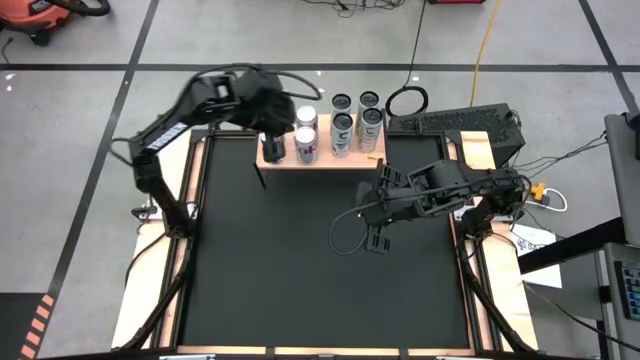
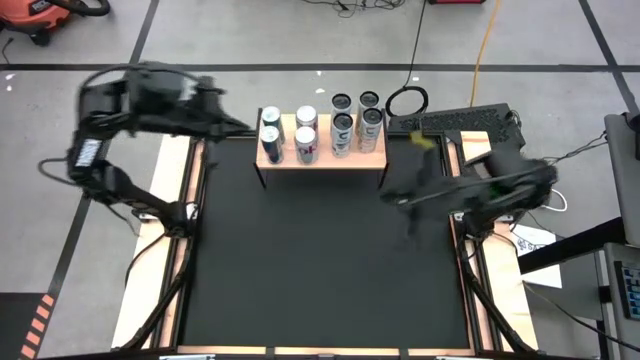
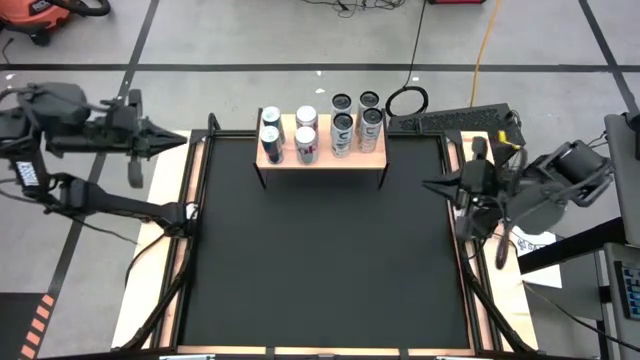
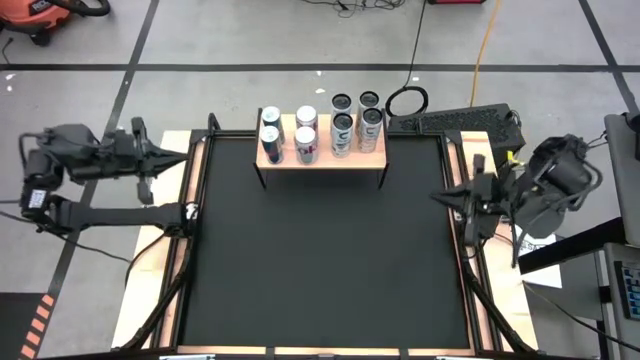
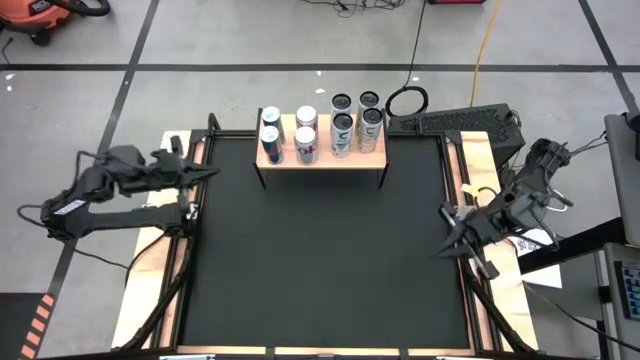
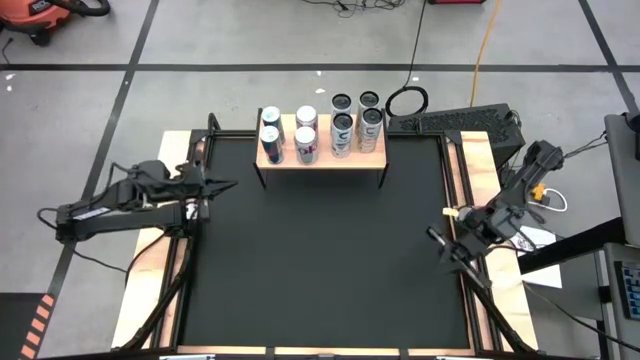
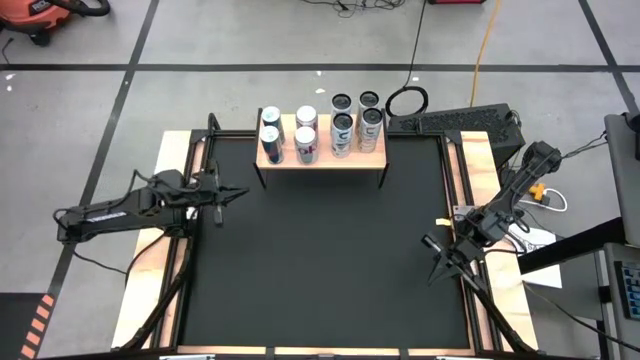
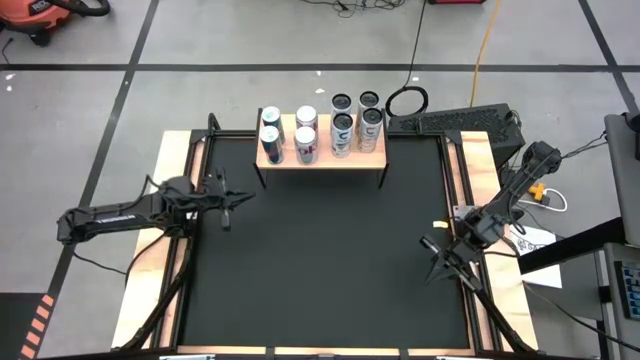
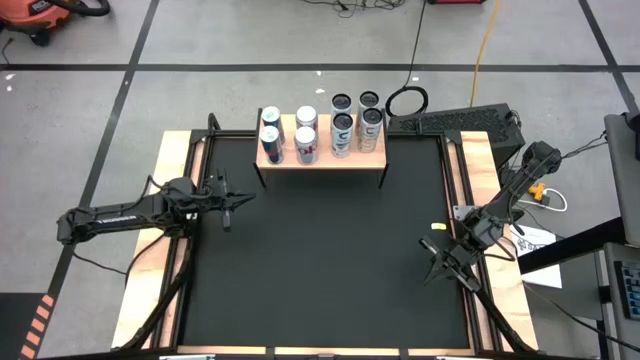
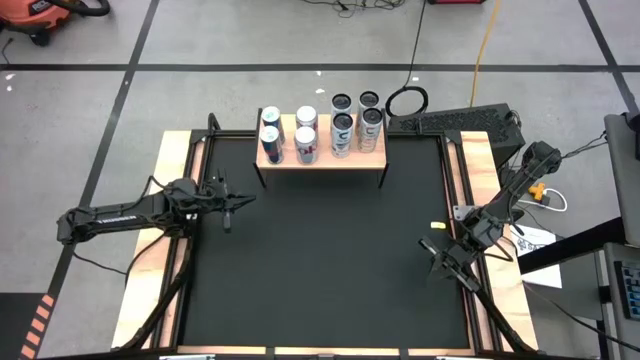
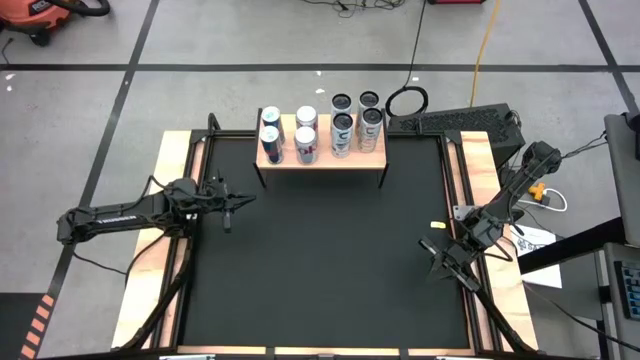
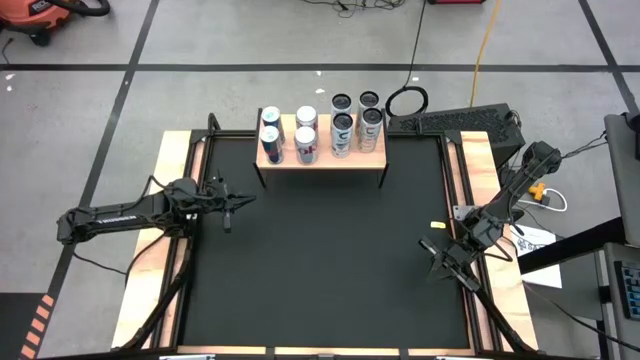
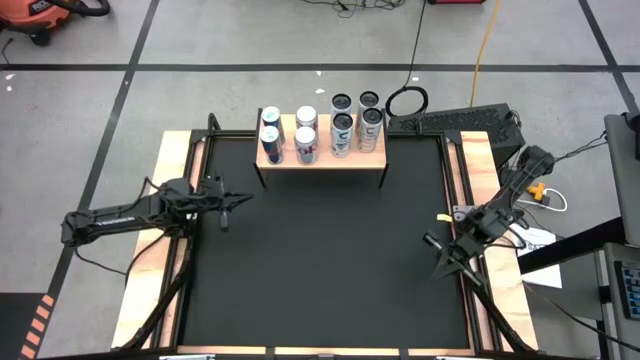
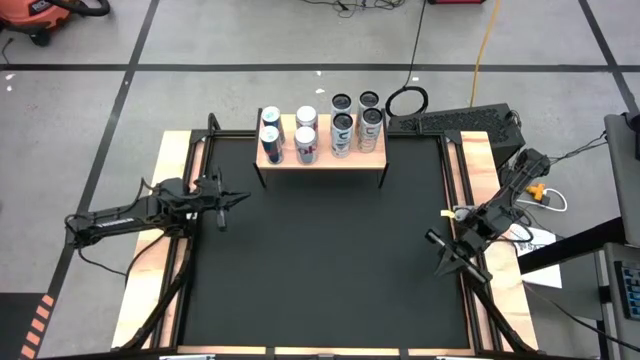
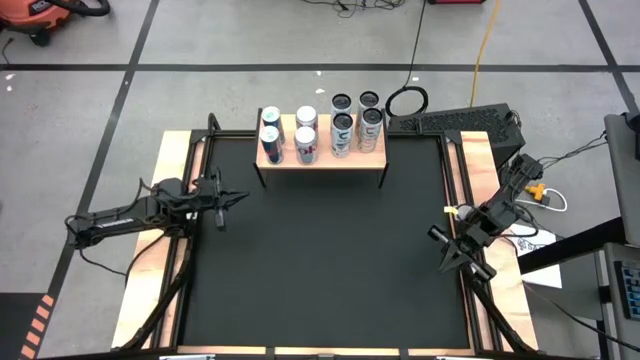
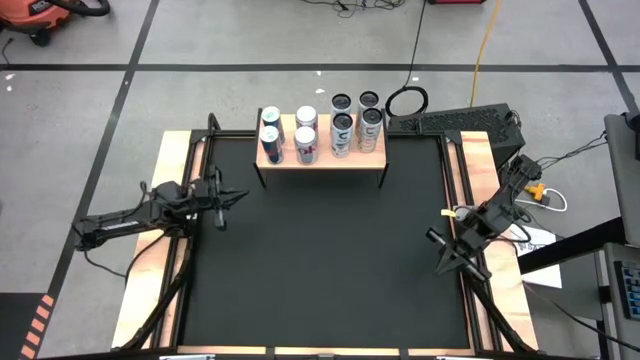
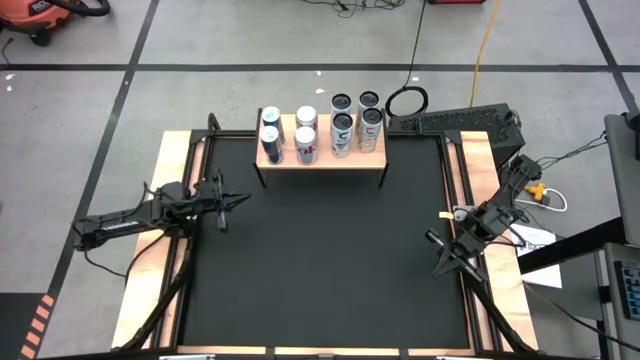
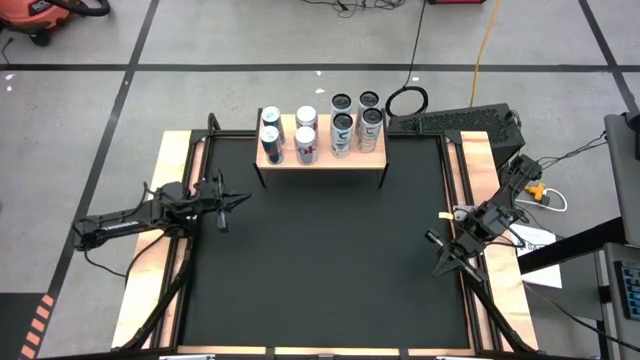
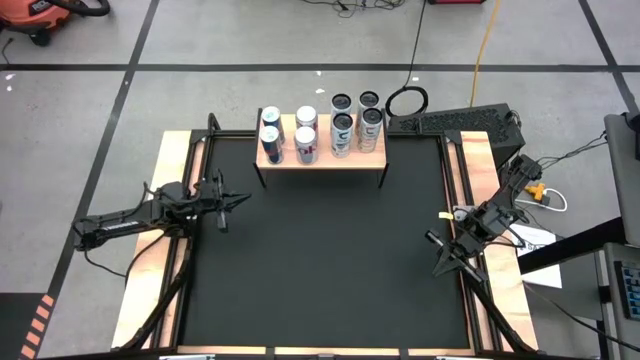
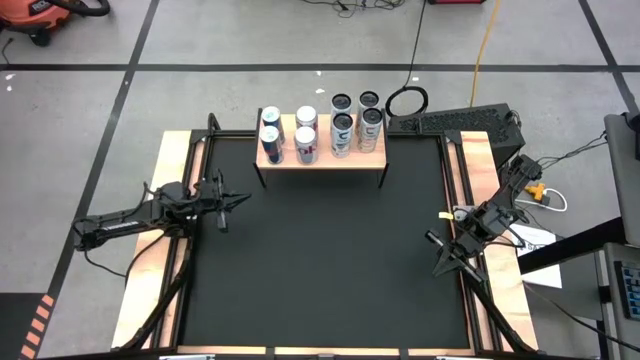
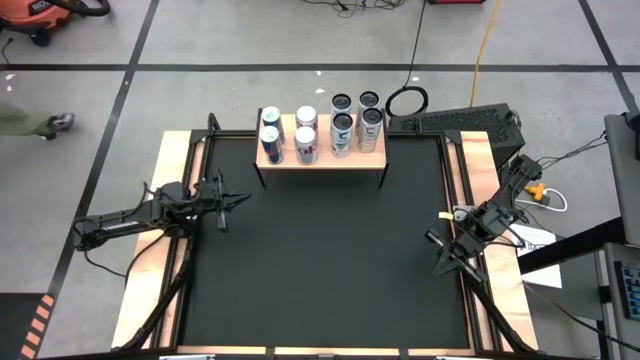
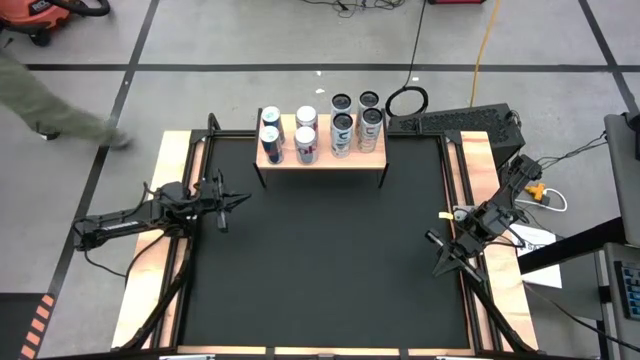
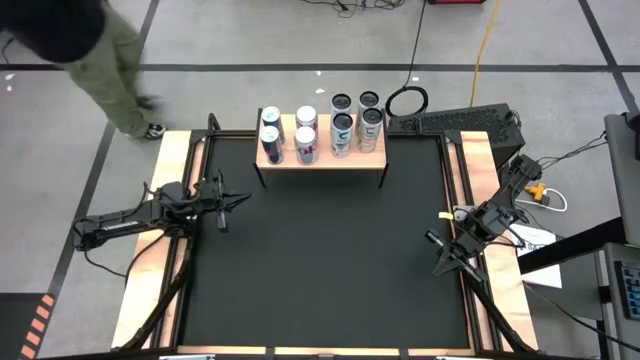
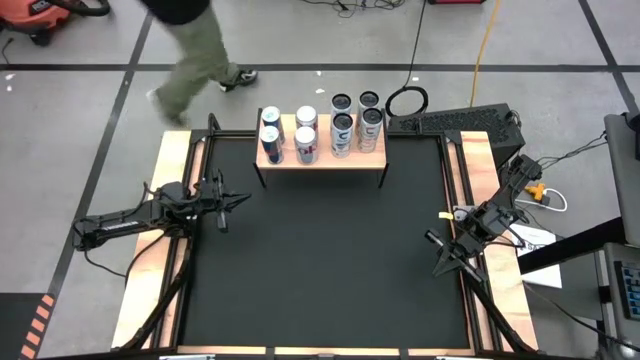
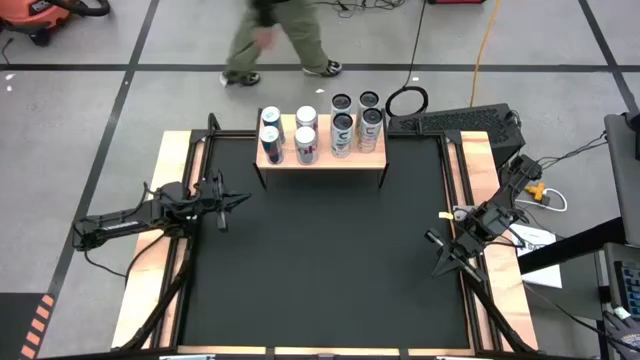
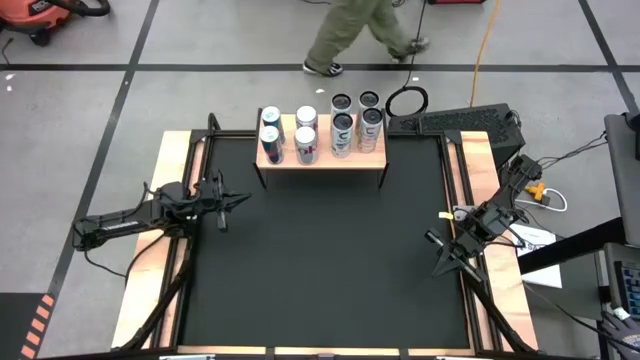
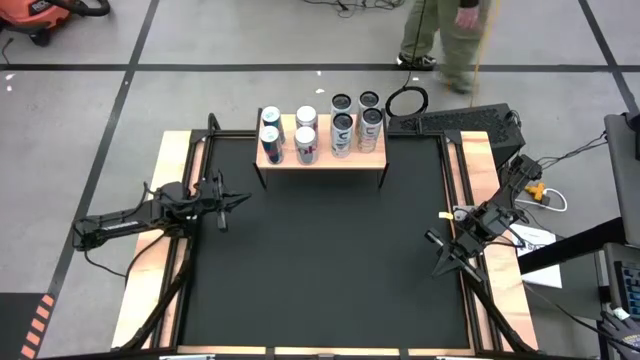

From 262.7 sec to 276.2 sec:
Task: Place canned beverage on shelf
Return to Home Position

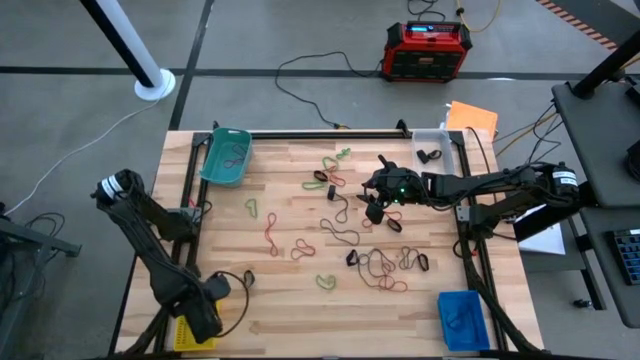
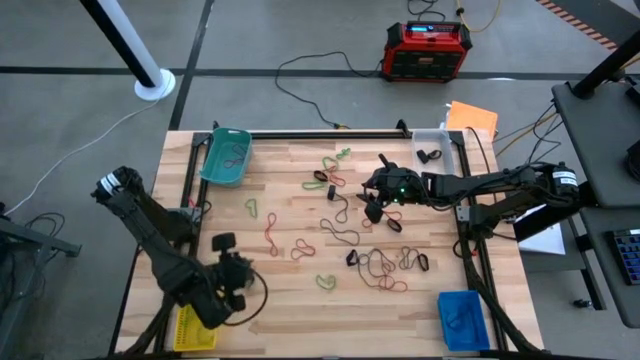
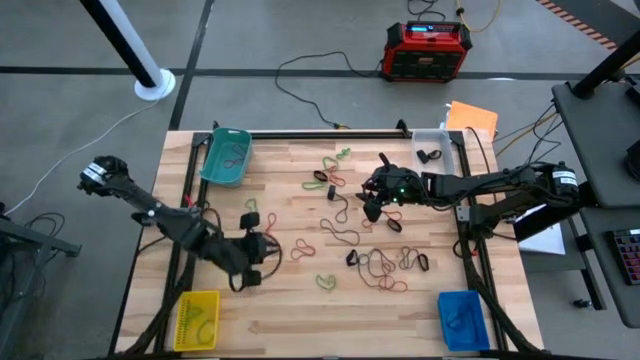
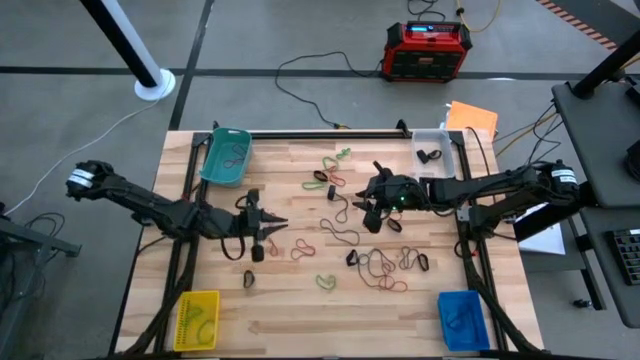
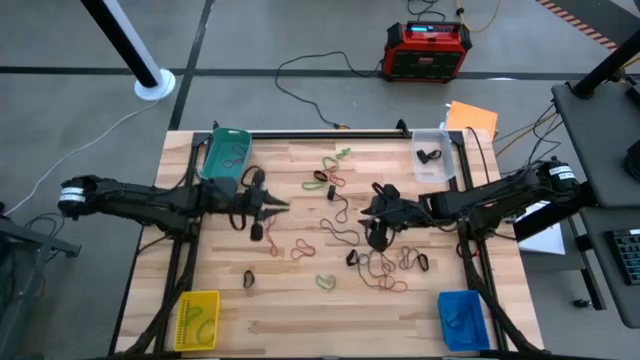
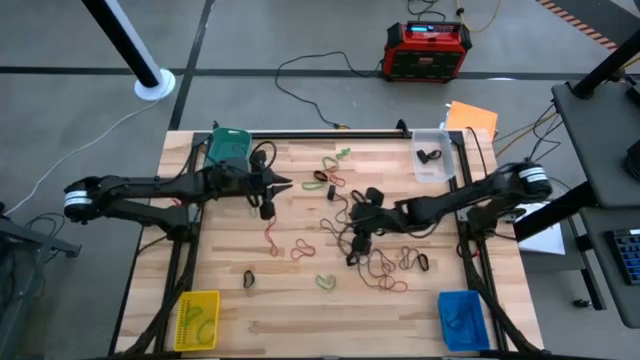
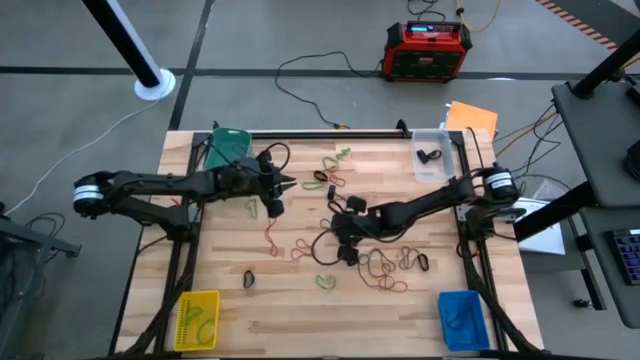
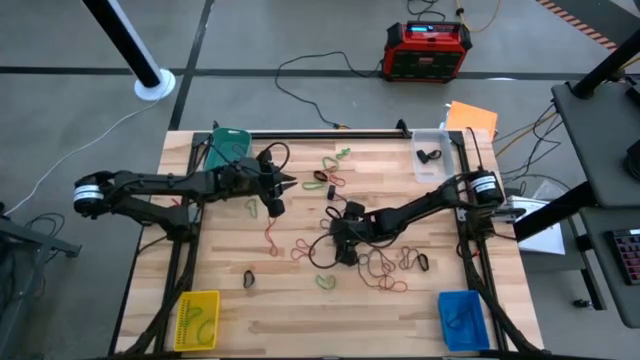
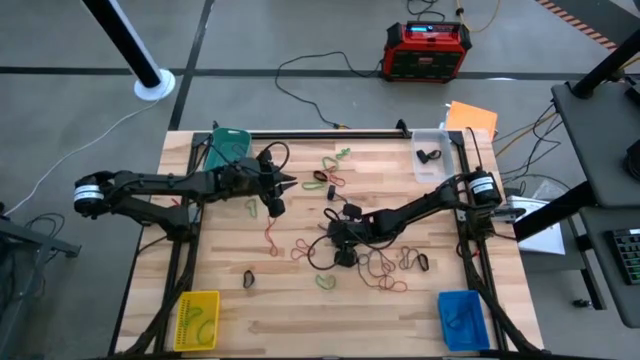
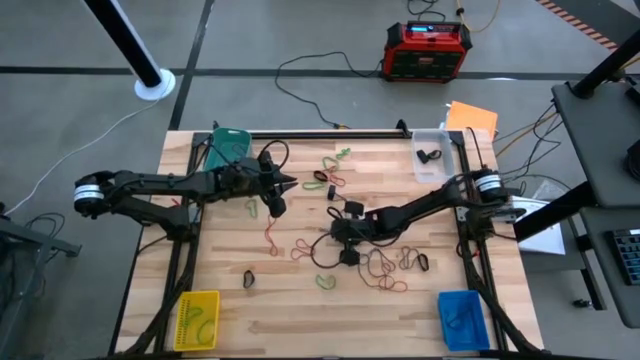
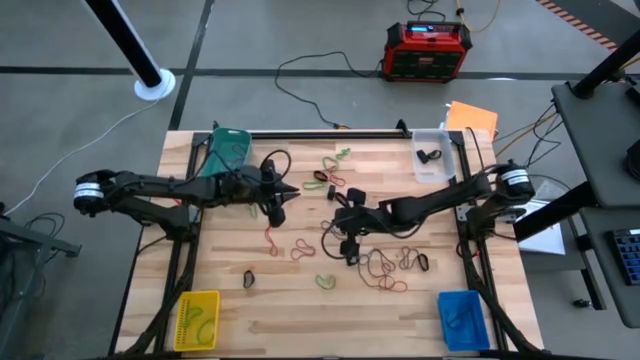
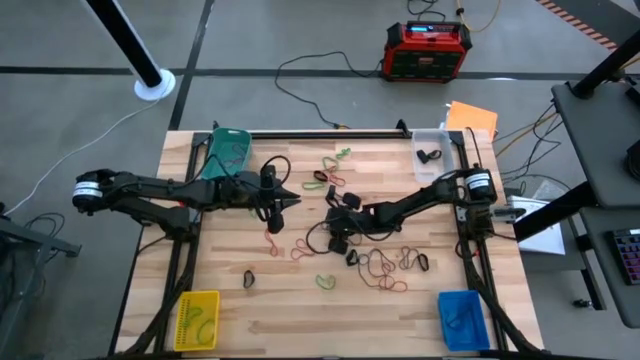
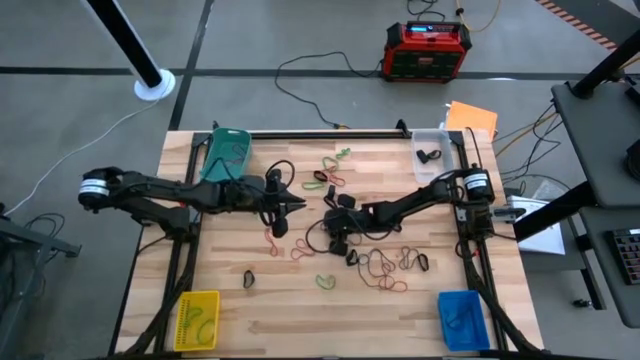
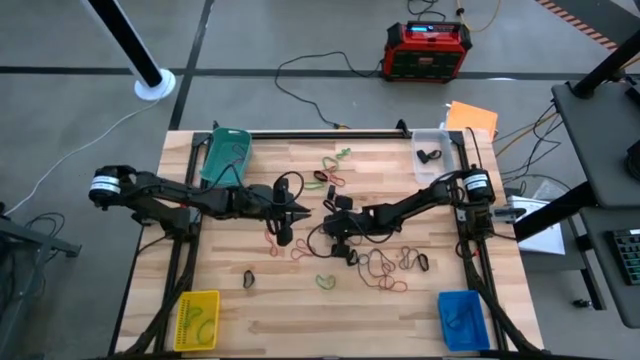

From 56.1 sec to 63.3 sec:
Task: Sort rubber bands into baskets
Put the violet rubber band into the blue bin
